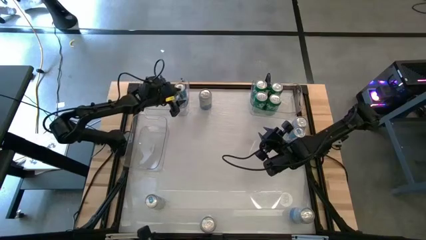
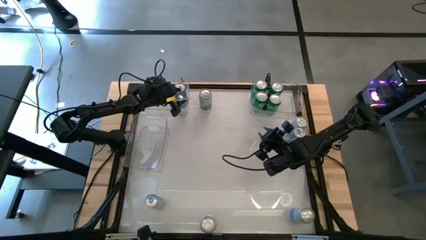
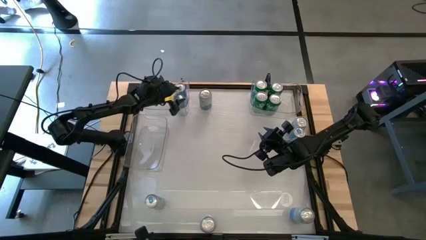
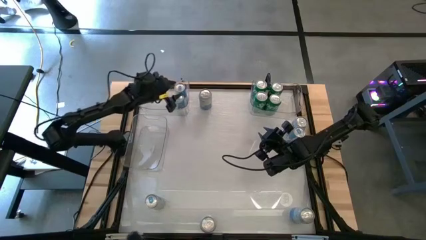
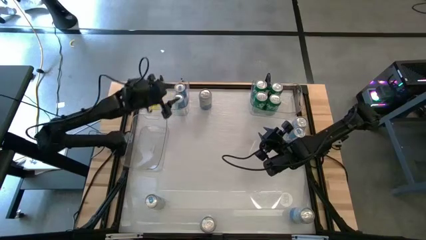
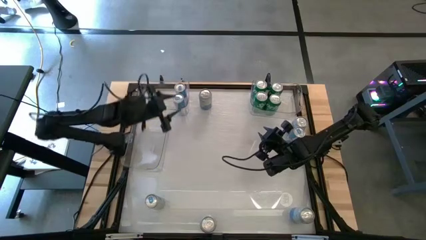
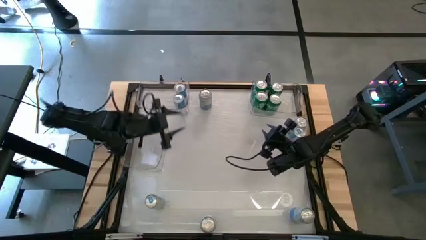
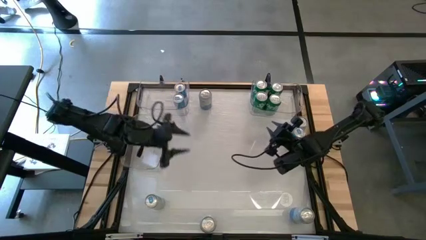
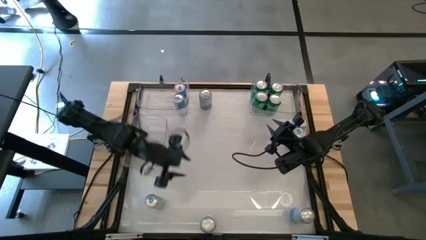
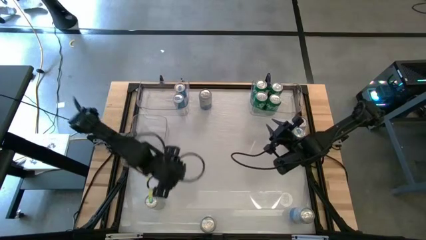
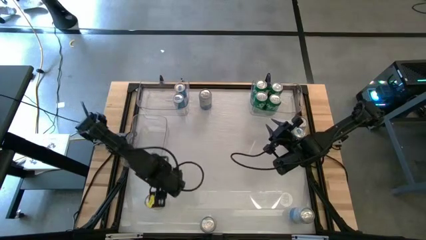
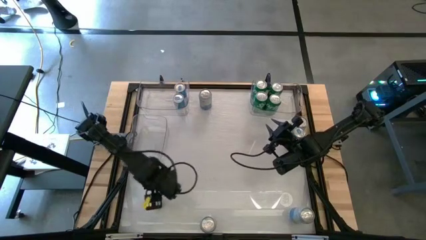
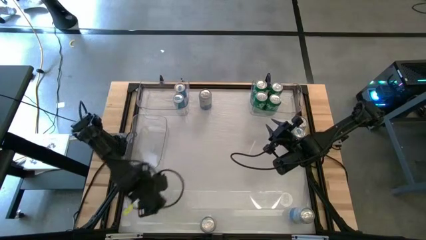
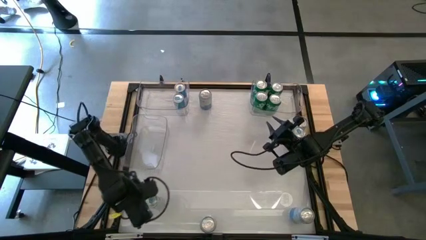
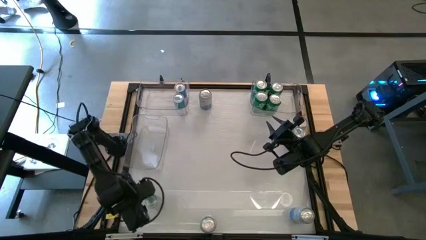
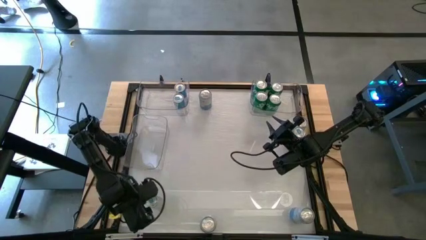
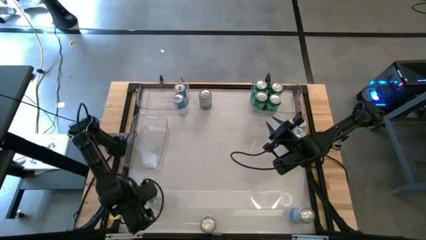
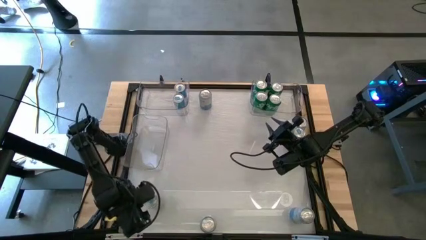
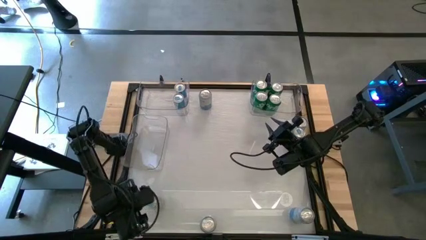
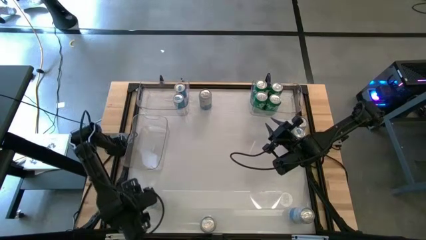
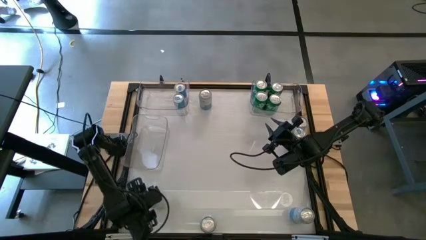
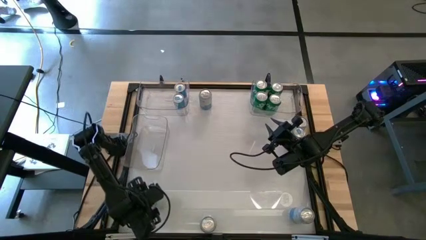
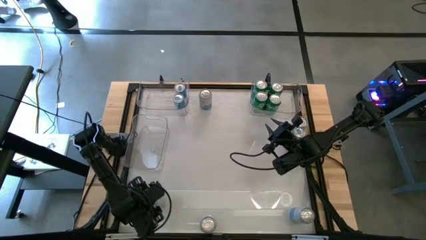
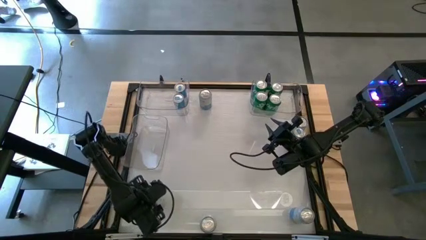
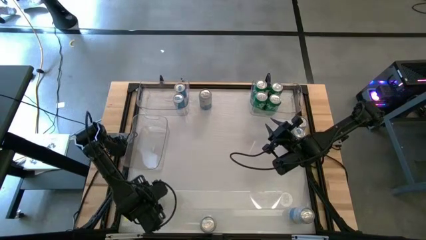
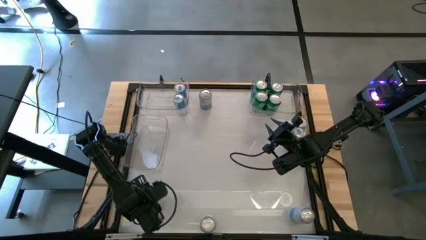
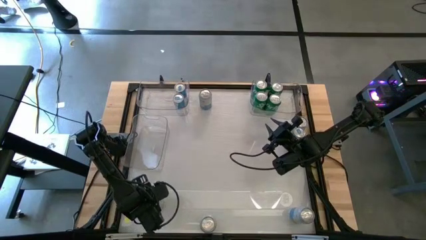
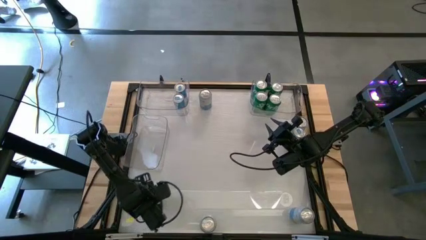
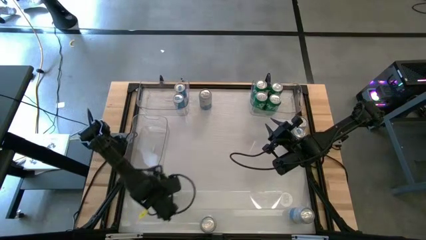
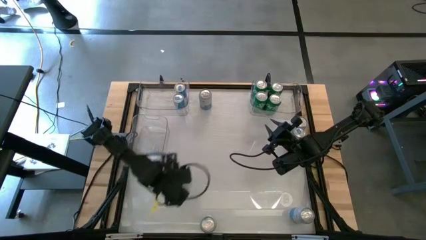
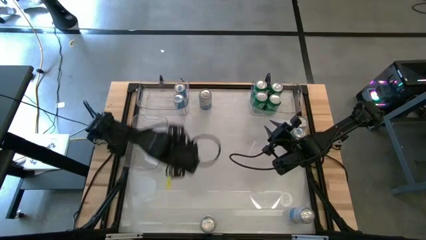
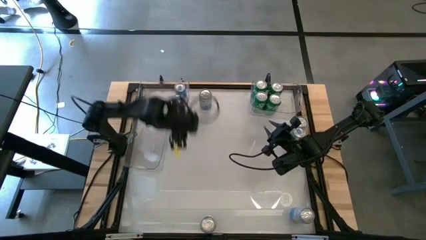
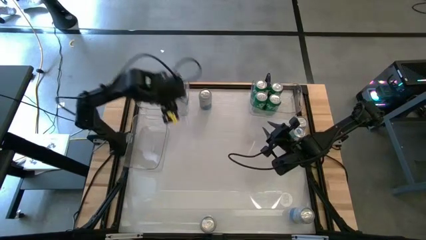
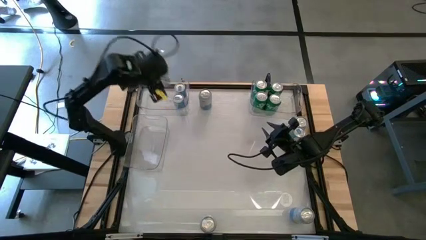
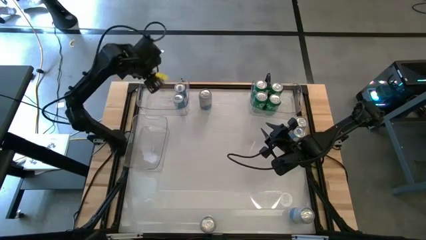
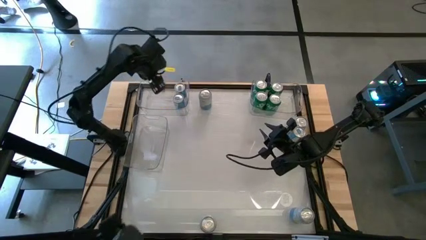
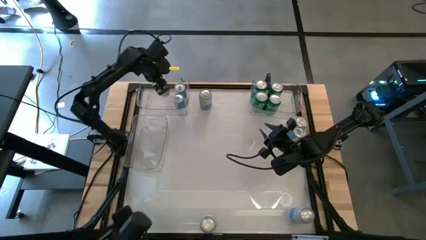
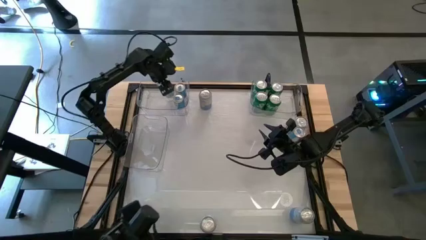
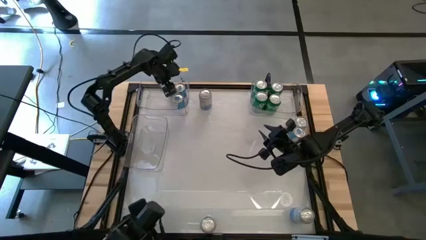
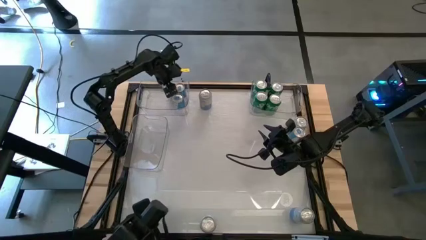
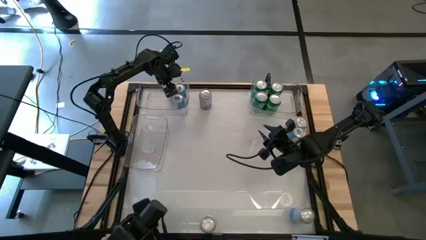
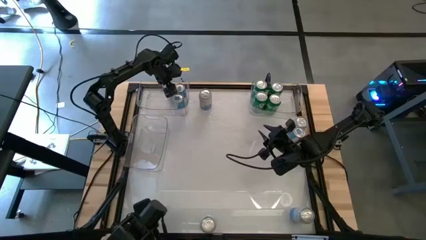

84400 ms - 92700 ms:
Task: Sort soda cans
Put the bottom blue soda can into the top left transparent bin

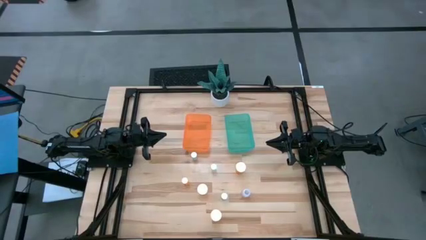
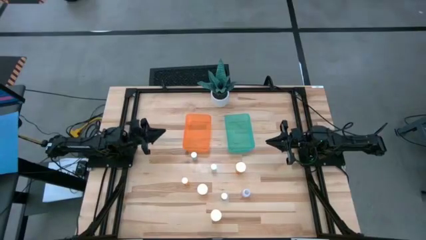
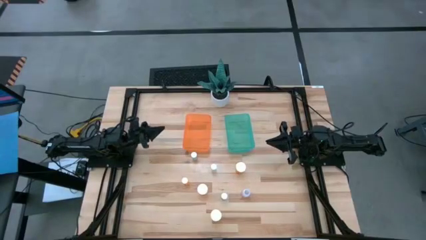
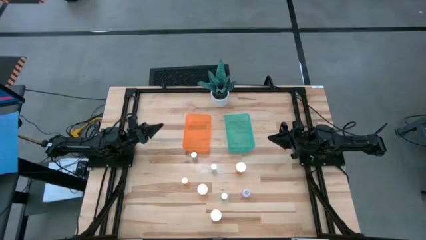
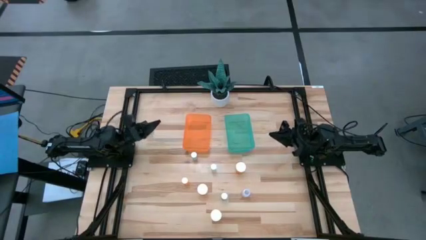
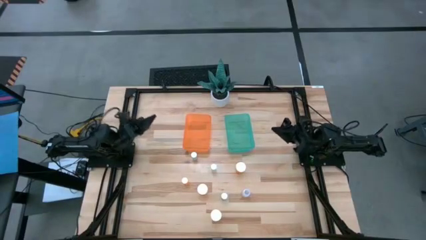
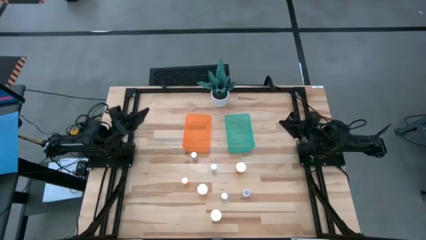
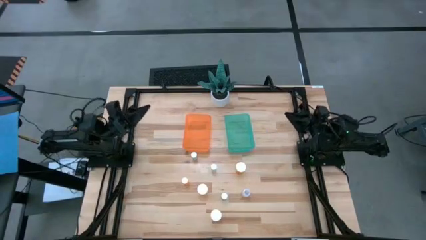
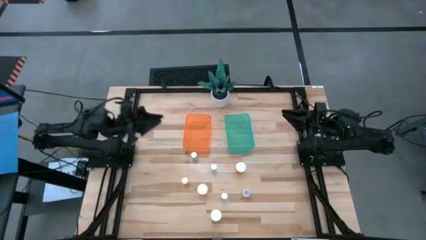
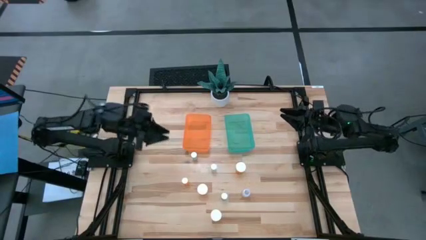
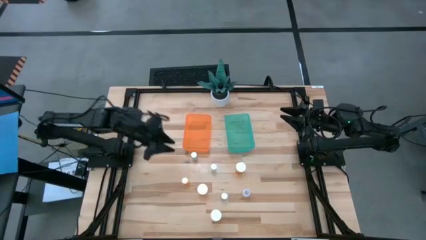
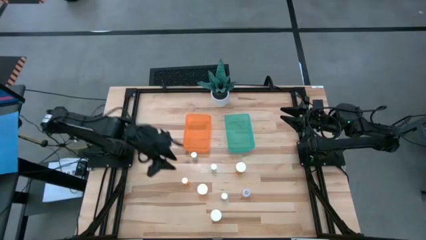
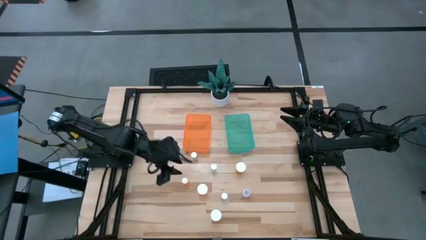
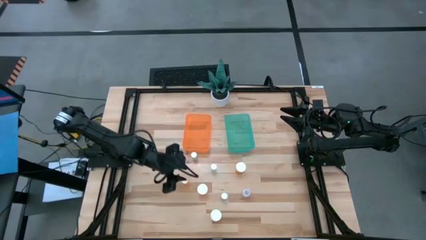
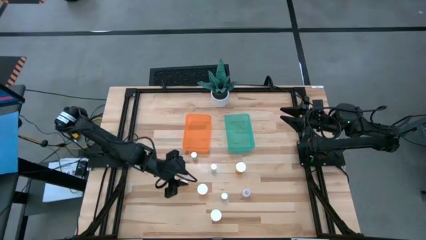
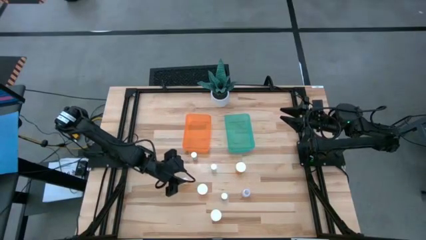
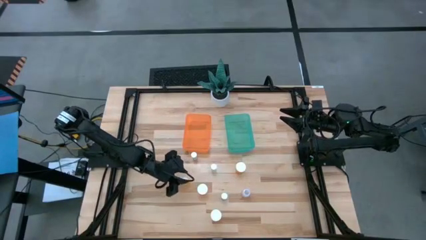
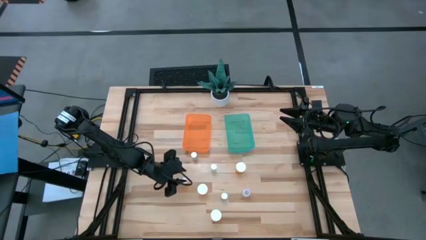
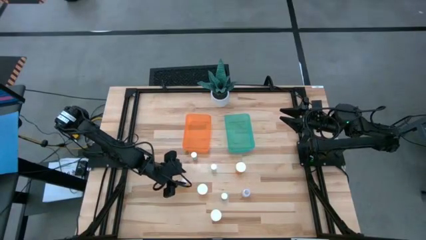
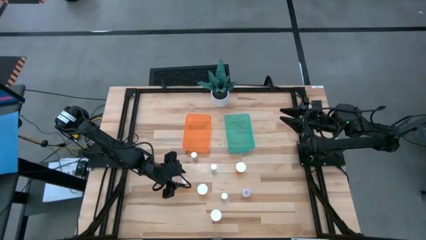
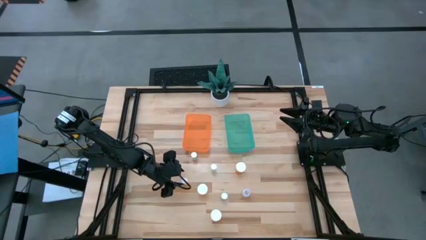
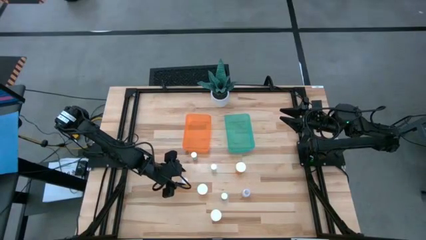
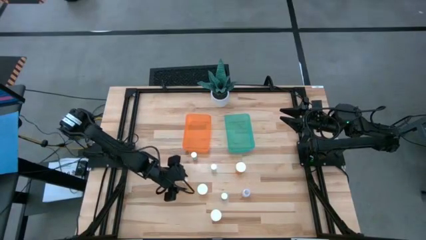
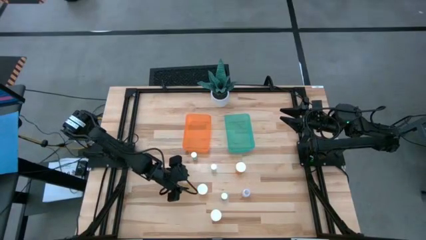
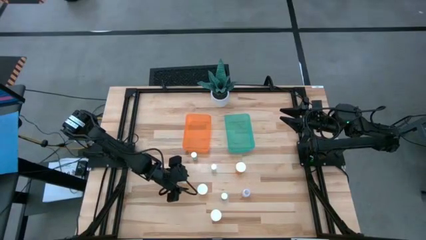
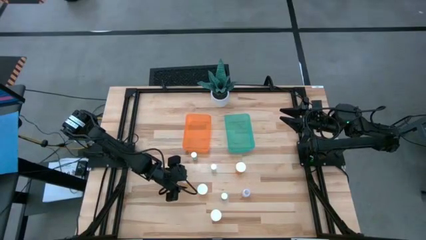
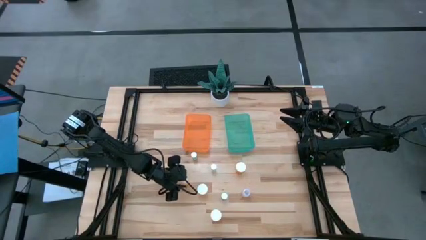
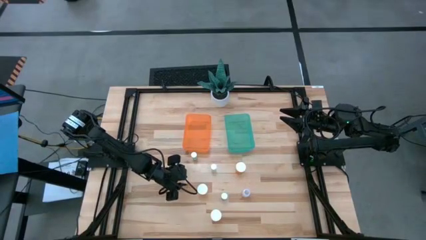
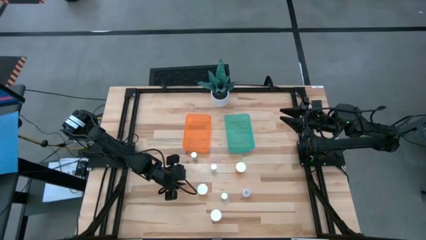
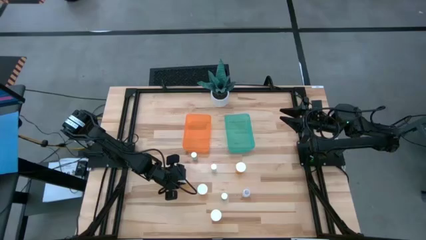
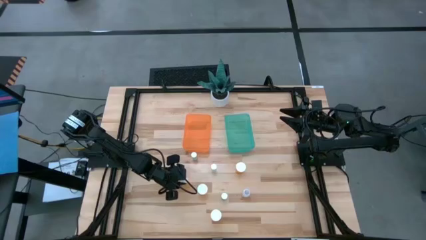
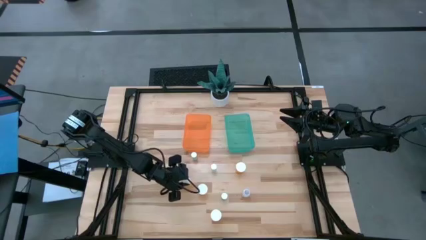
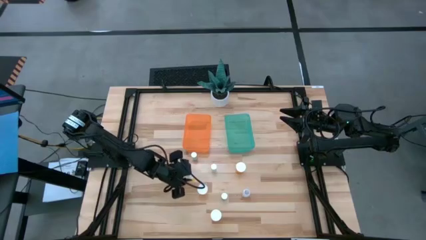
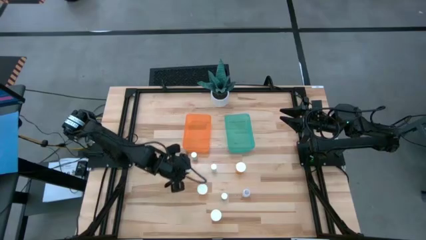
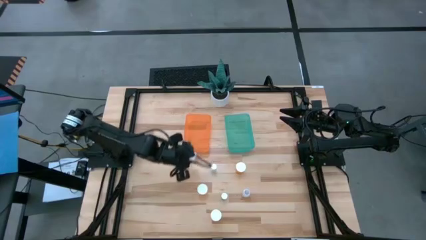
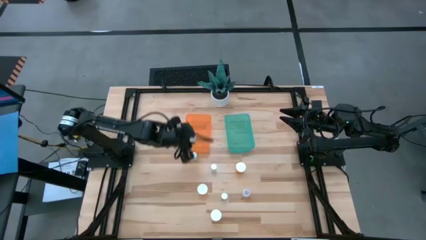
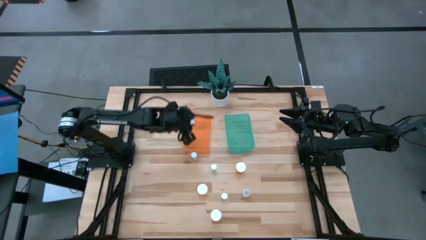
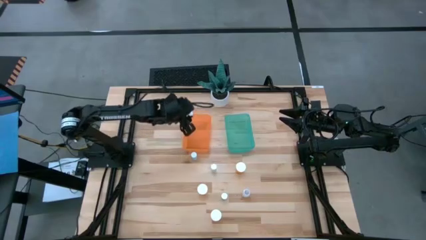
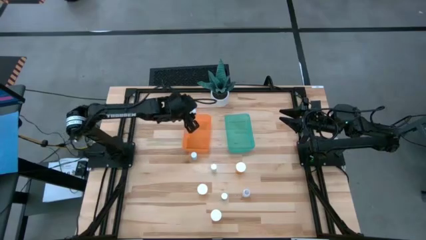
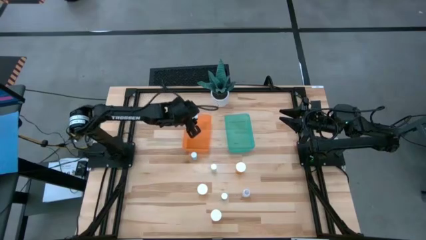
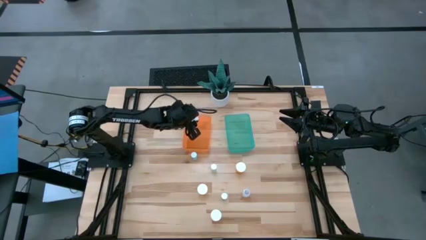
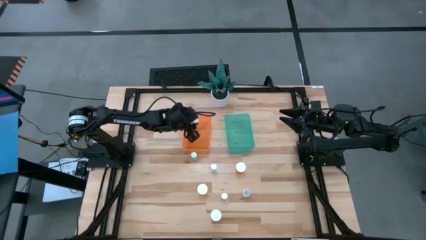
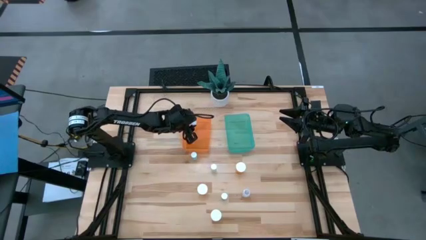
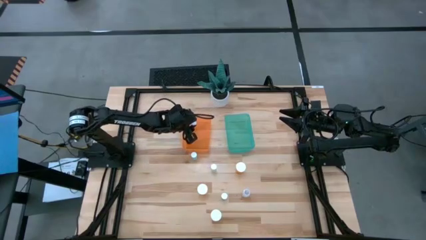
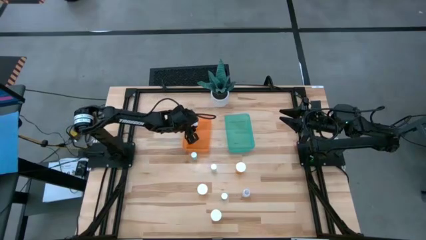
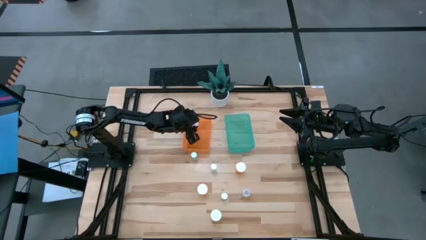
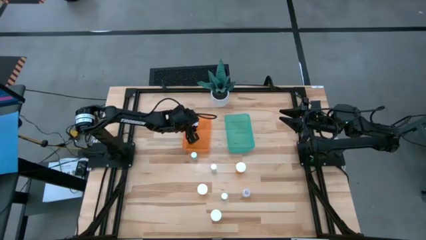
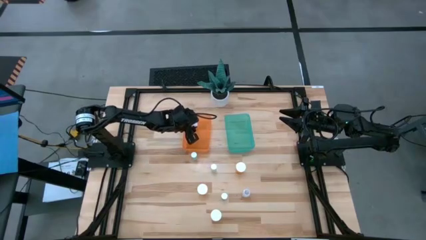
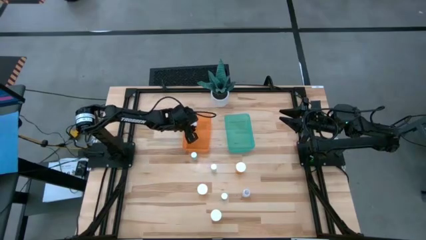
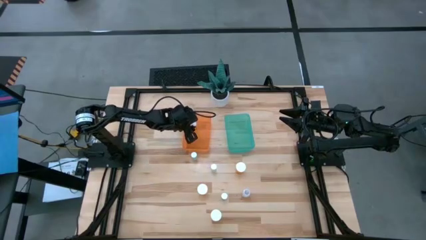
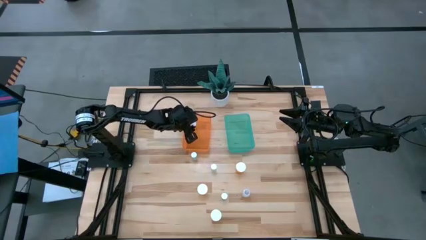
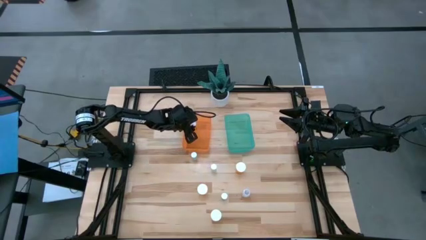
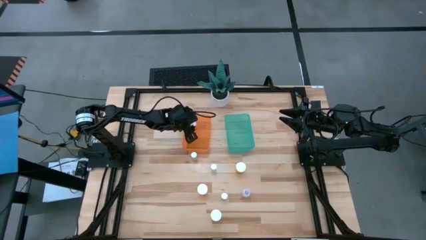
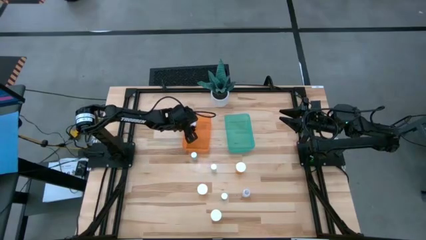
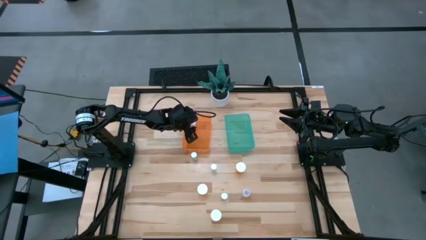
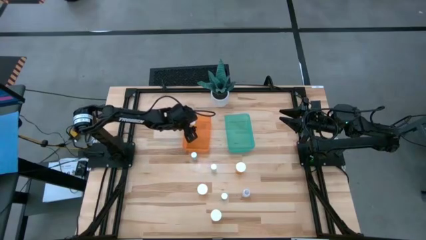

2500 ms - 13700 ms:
Task: Pick and place medicine bottles into bin by pill shape (circle, oval)
Put the small orange pill bottle into the orange bin
